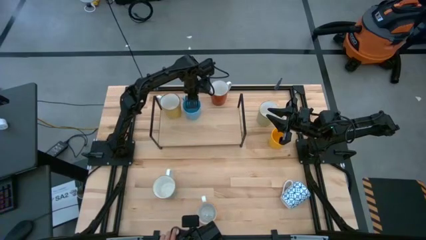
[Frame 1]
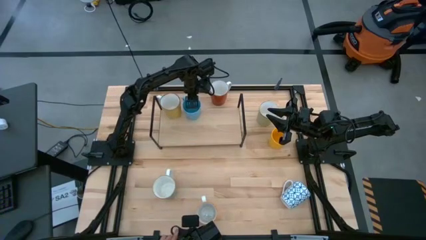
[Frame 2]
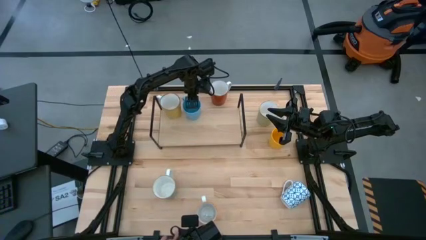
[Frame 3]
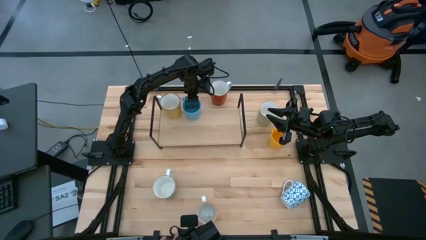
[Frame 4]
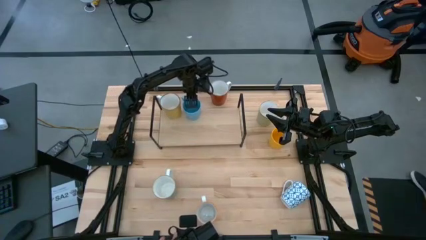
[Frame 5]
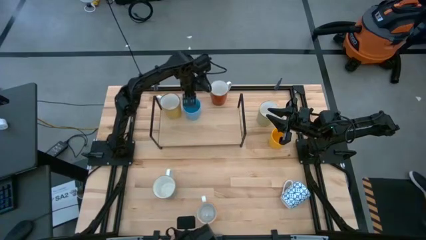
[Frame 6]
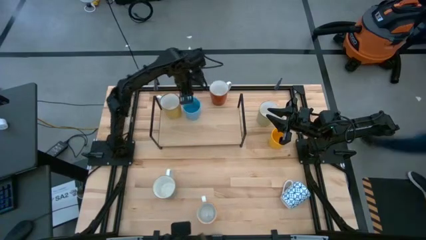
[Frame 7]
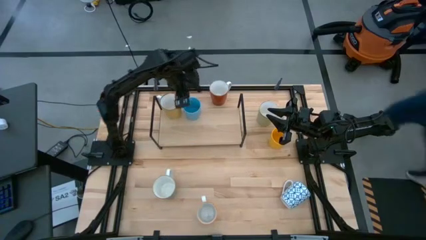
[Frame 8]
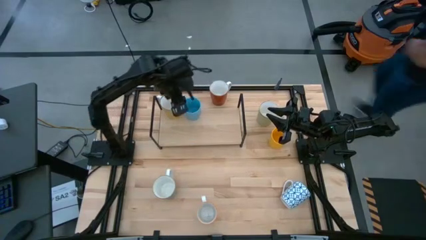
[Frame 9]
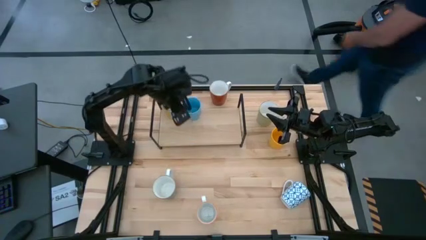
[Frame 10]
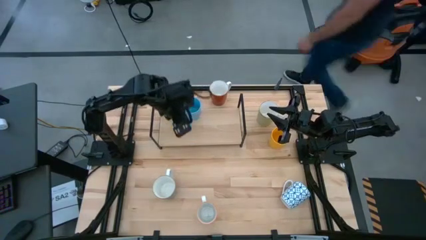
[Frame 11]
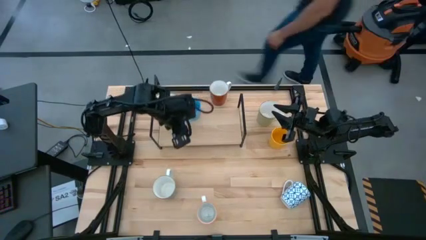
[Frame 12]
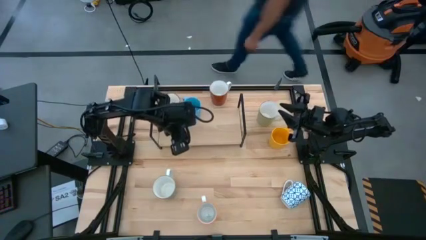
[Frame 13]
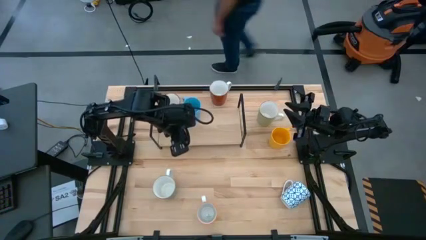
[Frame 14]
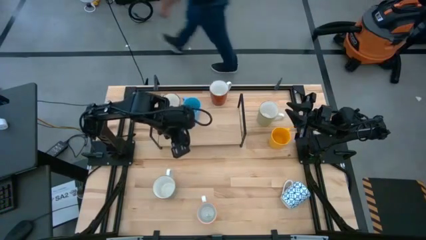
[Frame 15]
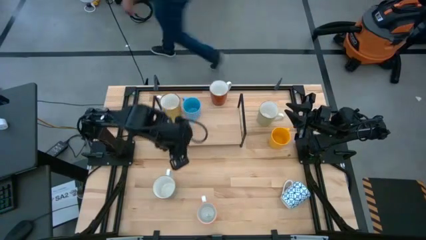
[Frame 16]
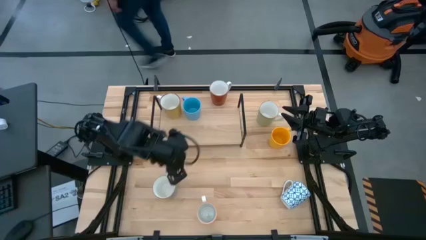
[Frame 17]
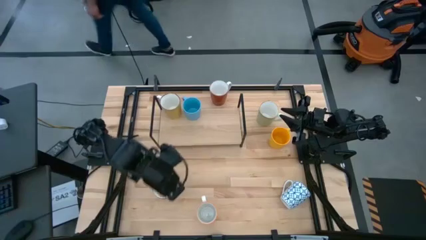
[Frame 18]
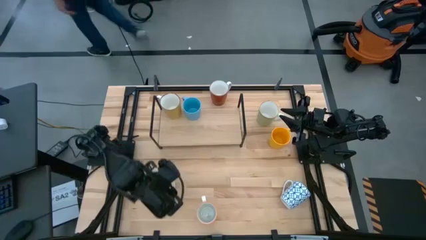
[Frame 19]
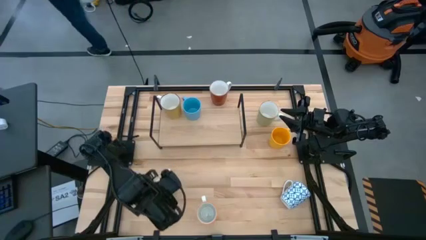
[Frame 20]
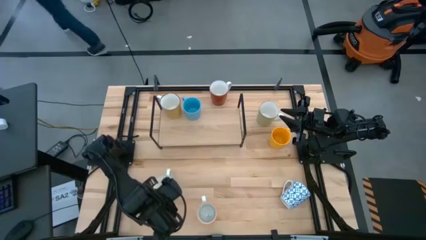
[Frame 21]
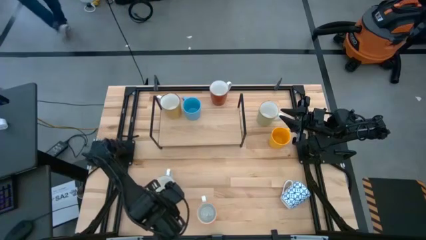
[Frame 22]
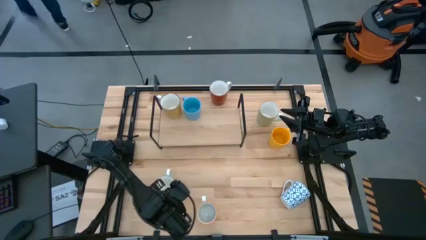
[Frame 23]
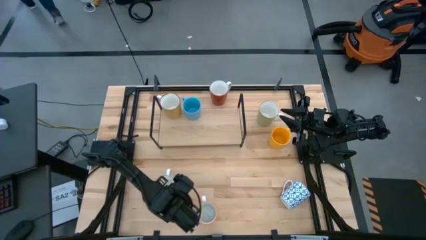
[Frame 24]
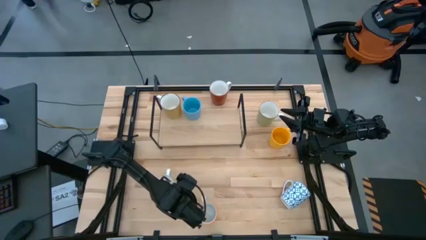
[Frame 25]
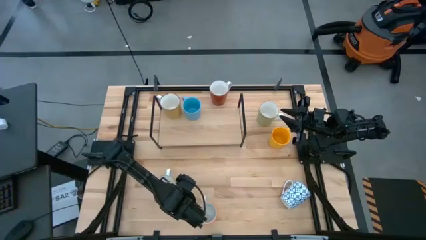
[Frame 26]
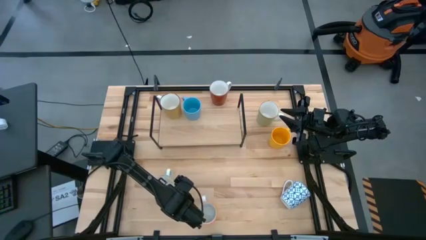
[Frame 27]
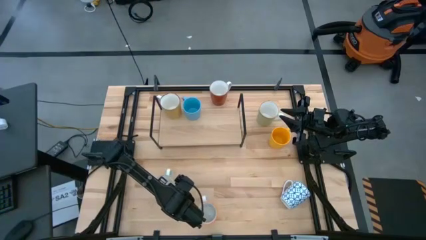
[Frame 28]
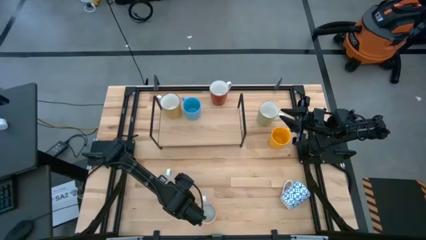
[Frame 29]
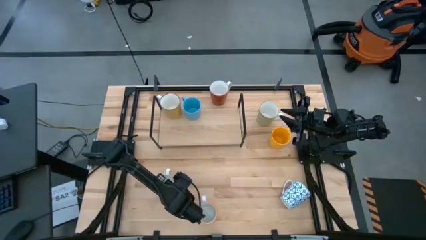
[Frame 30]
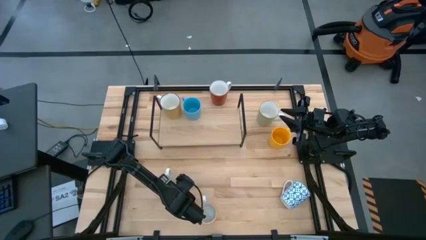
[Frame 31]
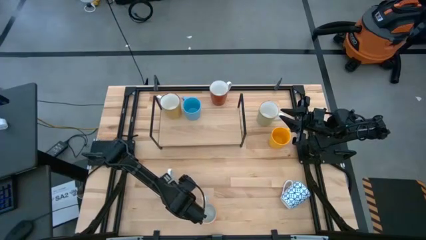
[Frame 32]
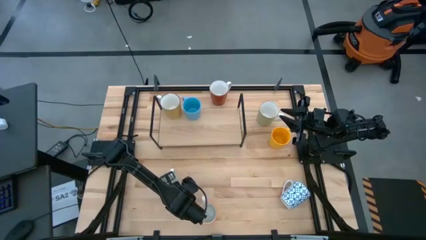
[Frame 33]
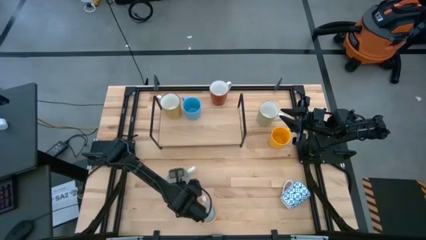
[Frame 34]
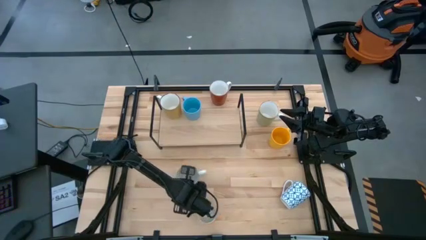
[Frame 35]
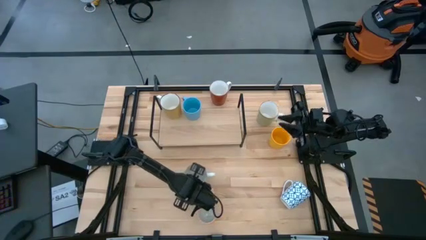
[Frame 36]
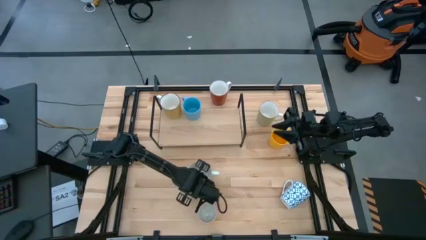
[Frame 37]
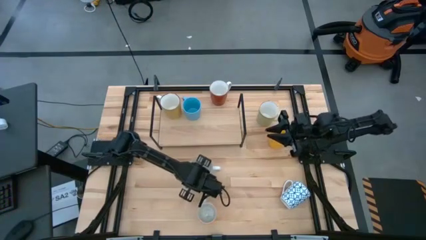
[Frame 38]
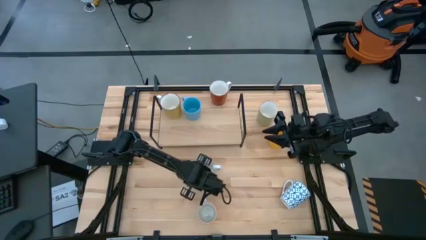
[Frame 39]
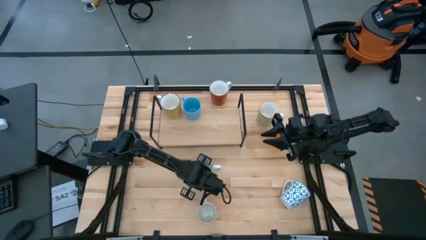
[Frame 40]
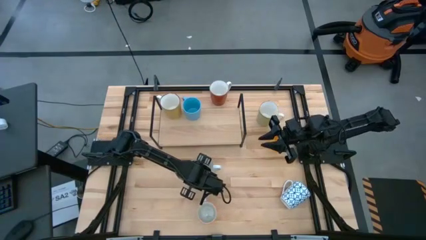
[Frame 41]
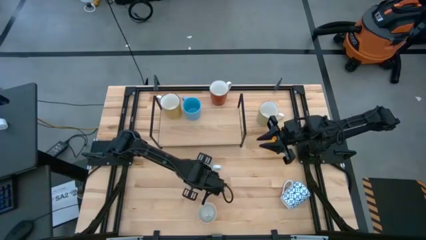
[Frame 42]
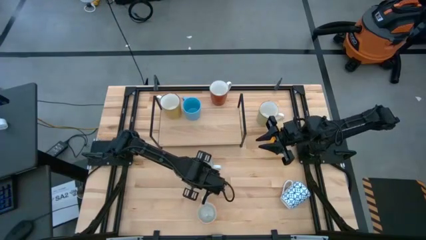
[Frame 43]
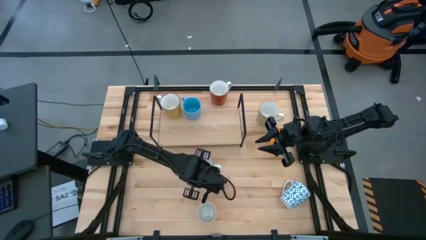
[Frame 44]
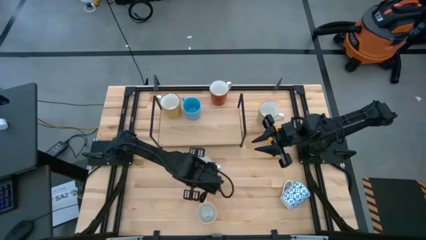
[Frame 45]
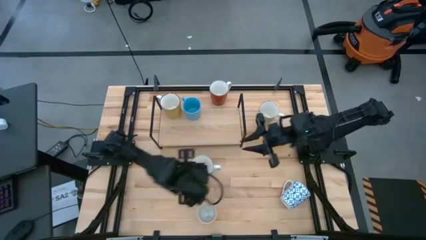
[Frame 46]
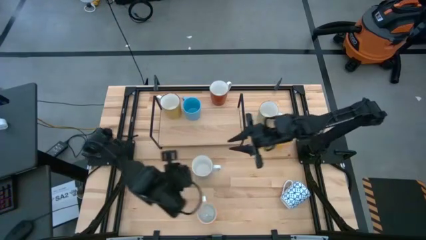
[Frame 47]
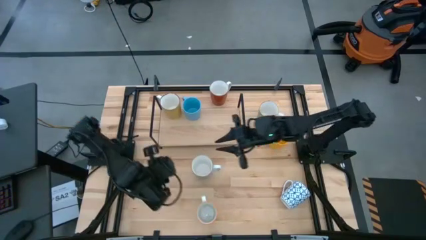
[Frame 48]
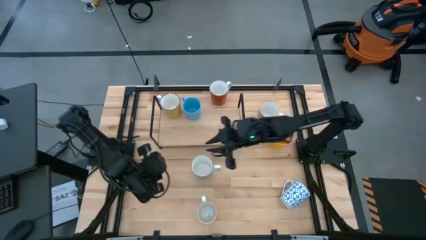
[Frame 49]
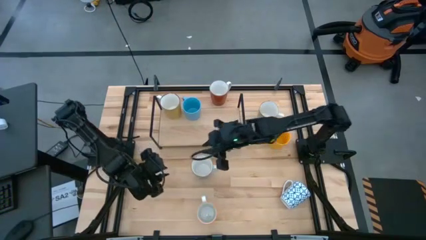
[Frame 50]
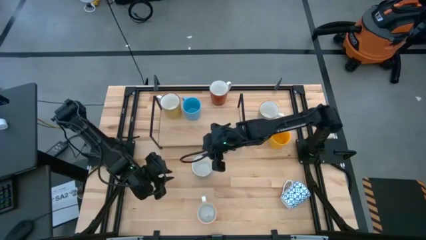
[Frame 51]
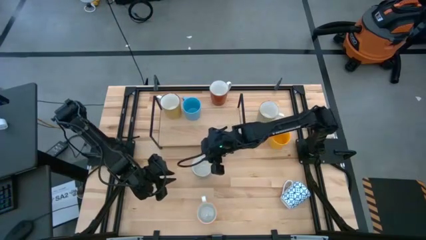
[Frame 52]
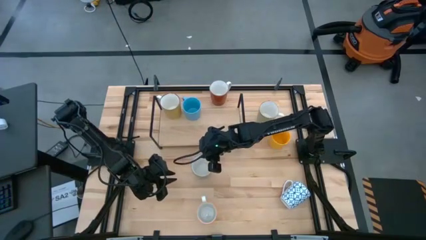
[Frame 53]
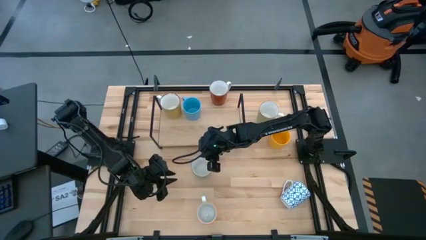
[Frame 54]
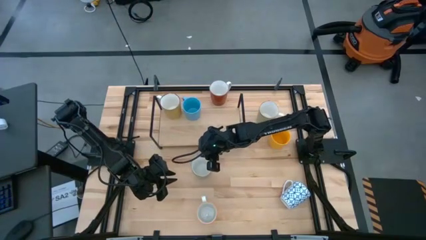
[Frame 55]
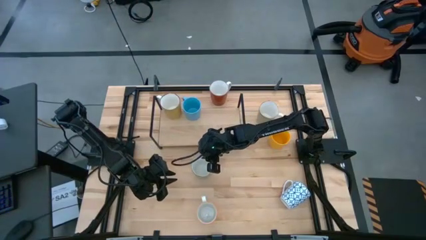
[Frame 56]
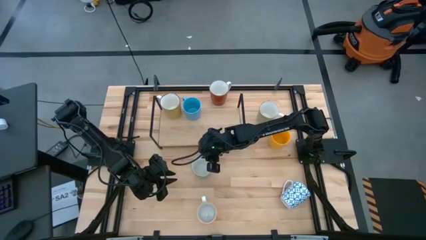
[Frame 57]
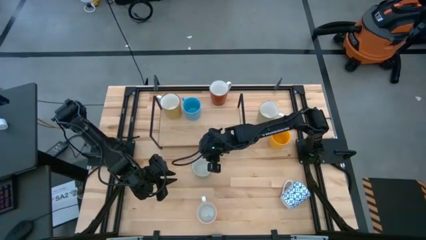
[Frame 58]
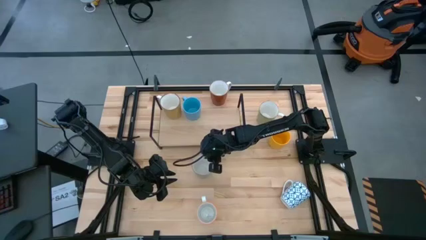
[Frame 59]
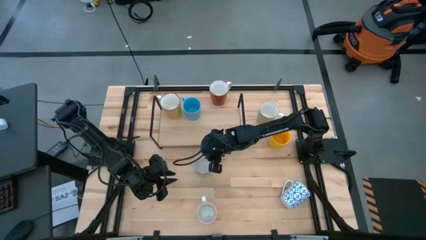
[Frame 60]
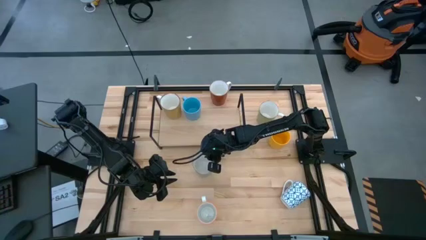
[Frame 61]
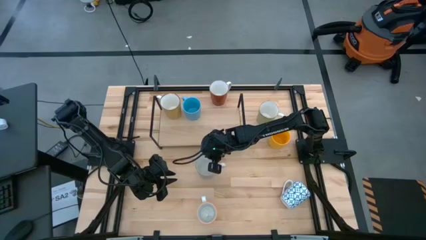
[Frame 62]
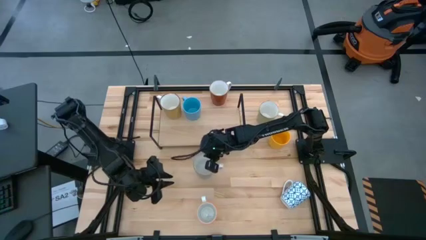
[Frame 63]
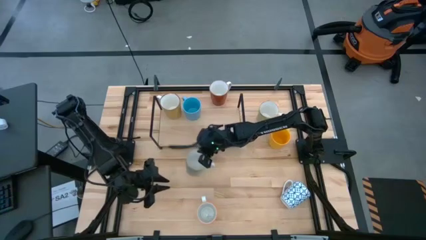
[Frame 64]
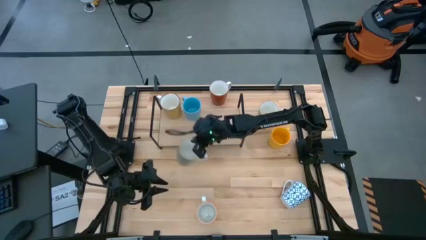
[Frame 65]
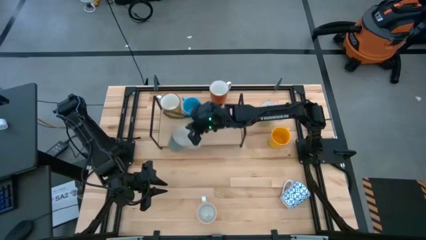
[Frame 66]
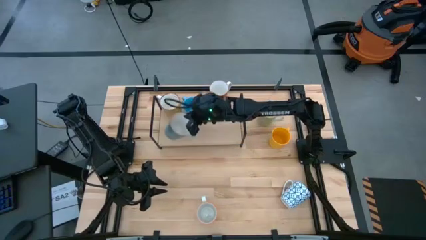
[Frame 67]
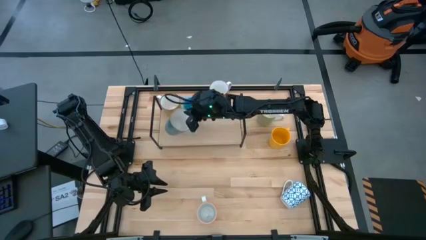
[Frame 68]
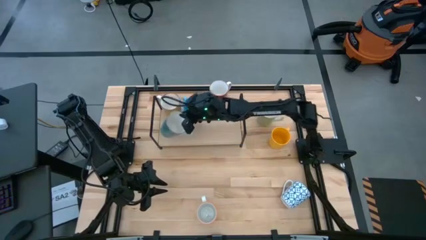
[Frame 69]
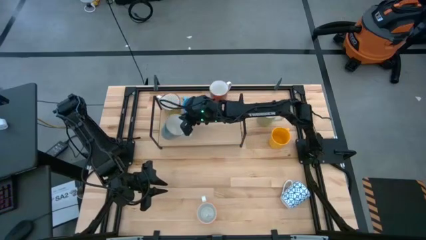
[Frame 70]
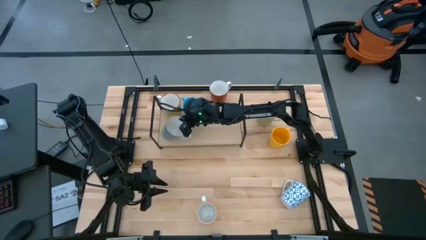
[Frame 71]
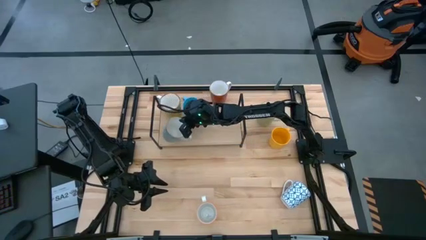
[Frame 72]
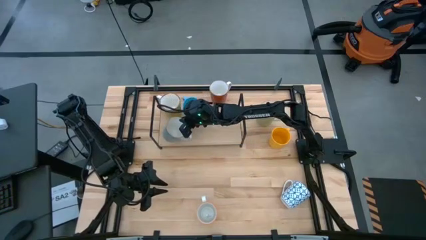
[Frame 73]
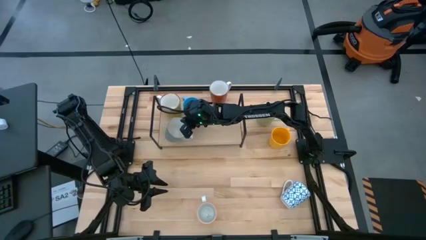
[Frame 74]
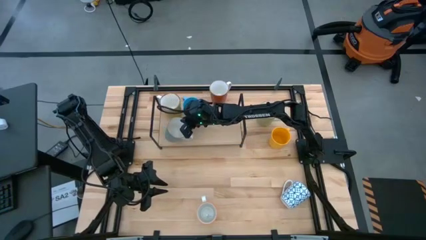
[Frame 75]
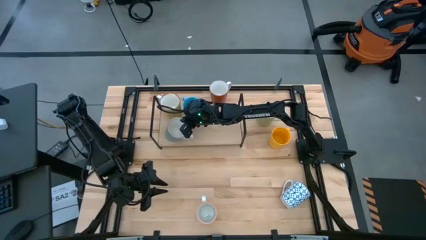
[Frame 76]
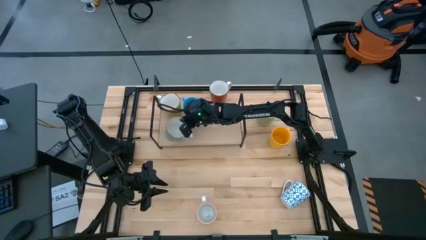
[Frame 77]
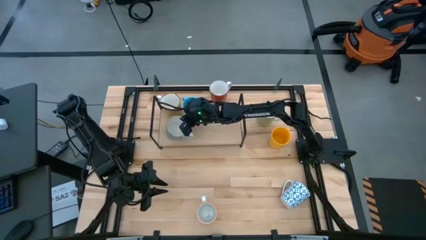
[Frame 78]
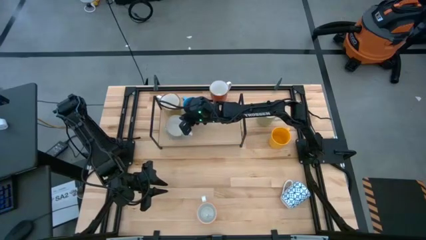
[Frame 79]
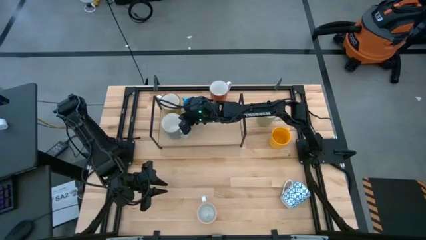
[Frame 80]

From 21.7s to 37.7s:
Task: Place coffee mugs
Put the light blue mug on the shelf
